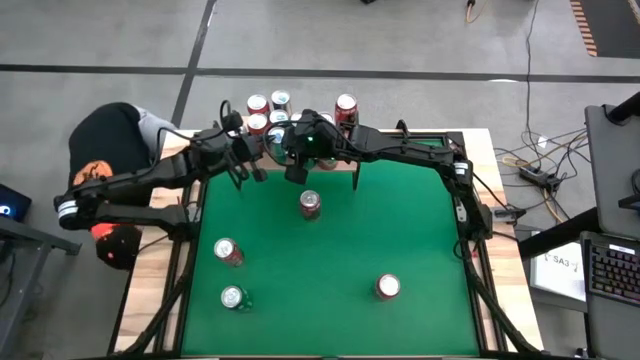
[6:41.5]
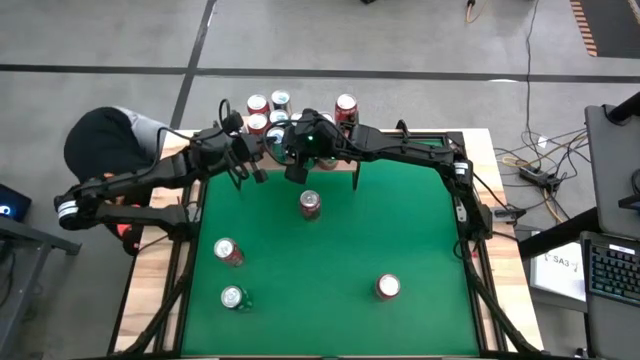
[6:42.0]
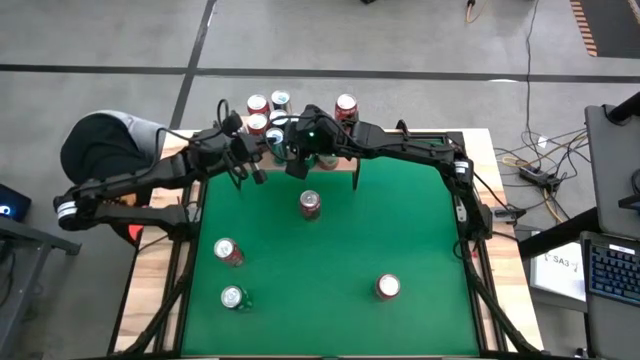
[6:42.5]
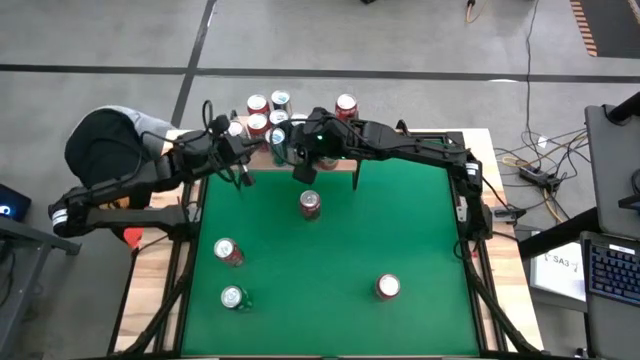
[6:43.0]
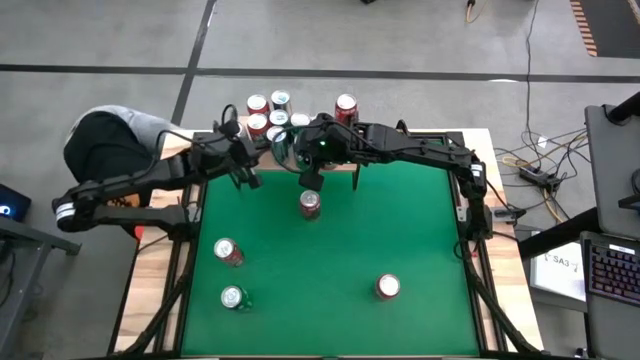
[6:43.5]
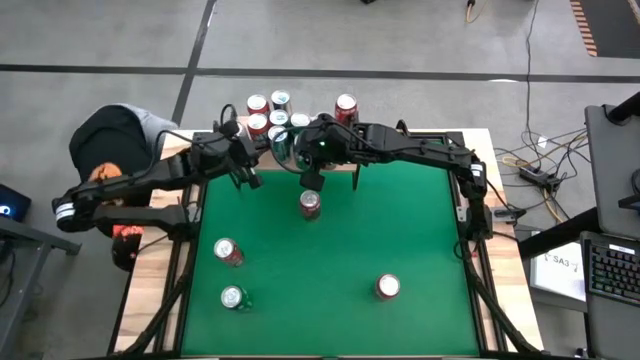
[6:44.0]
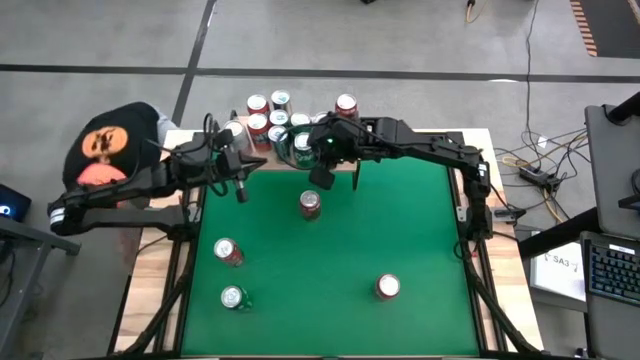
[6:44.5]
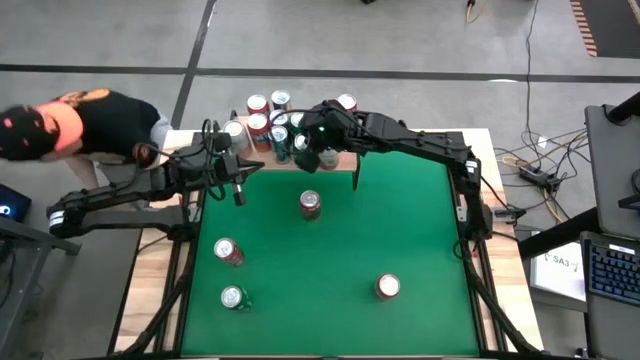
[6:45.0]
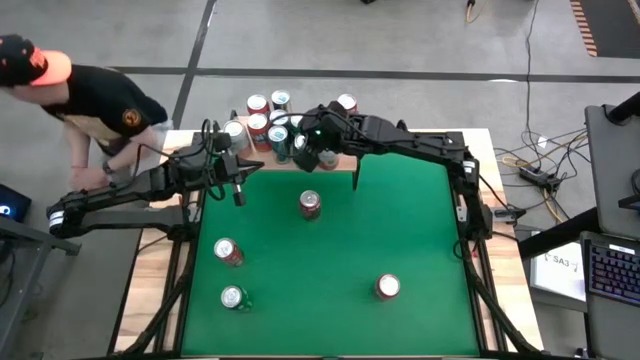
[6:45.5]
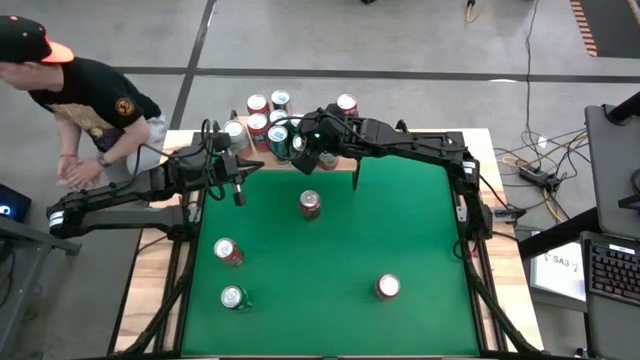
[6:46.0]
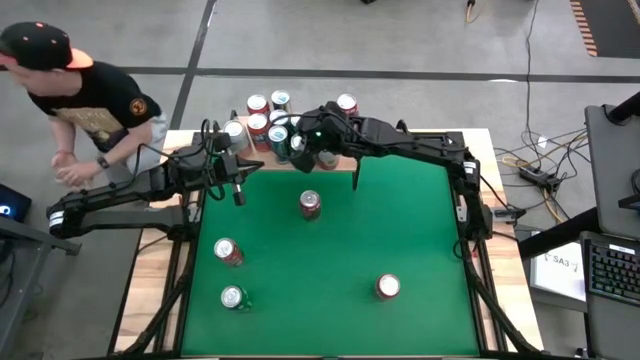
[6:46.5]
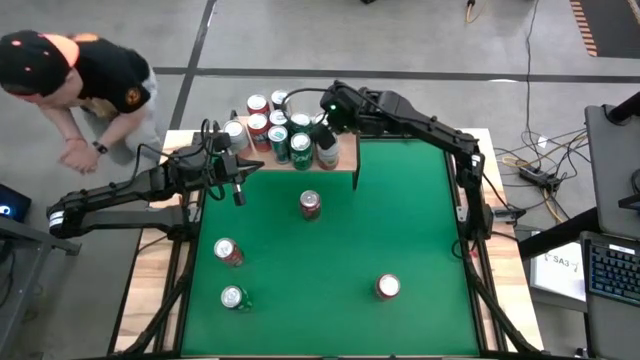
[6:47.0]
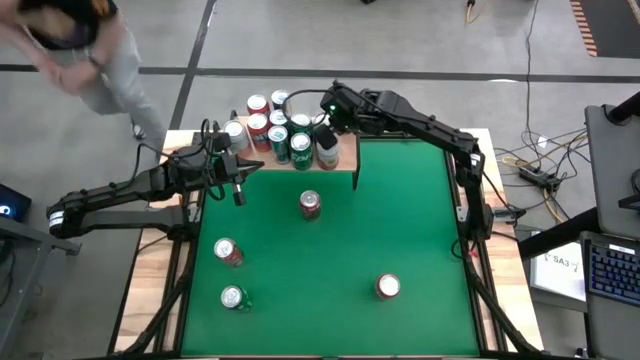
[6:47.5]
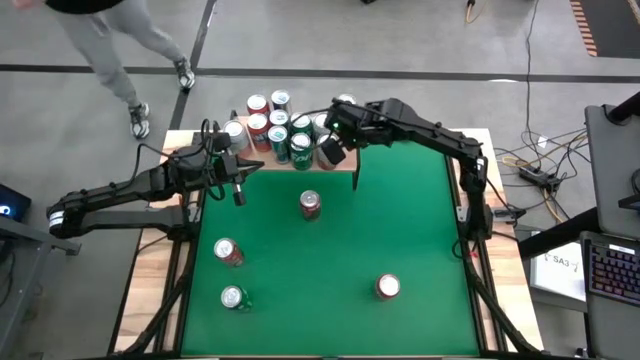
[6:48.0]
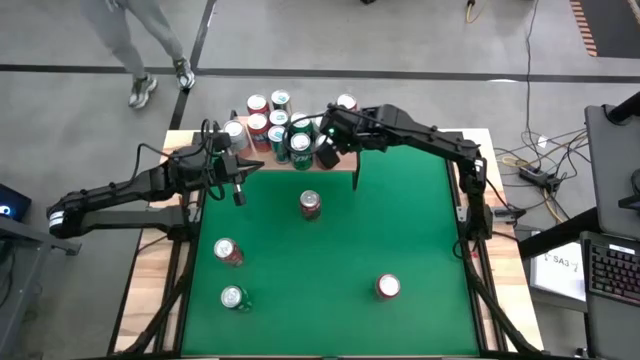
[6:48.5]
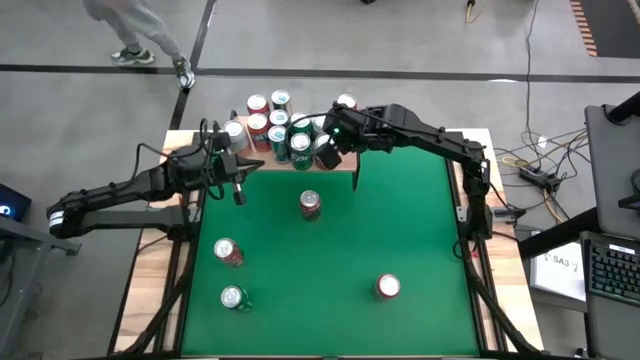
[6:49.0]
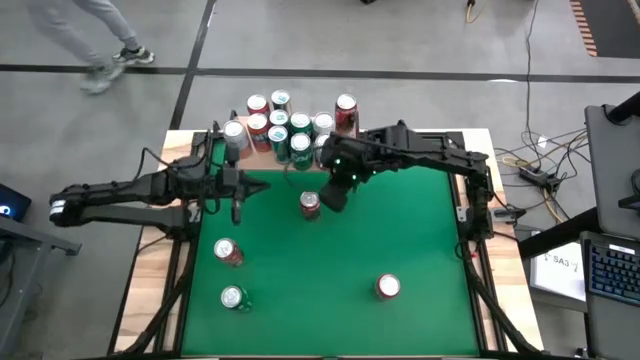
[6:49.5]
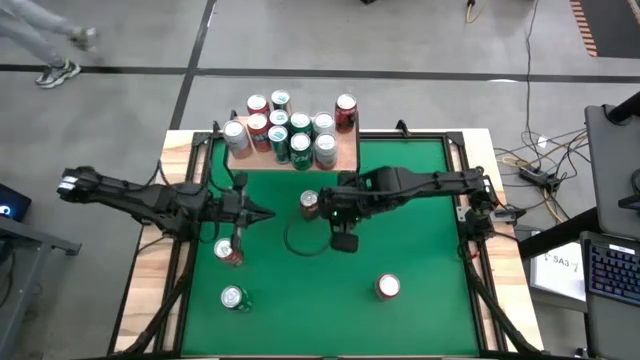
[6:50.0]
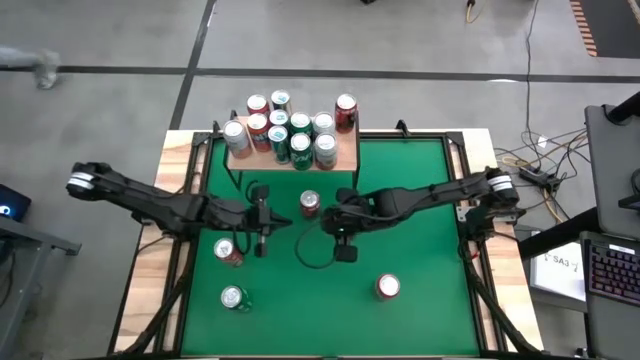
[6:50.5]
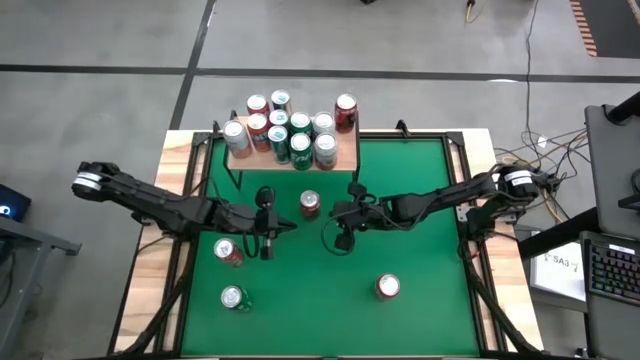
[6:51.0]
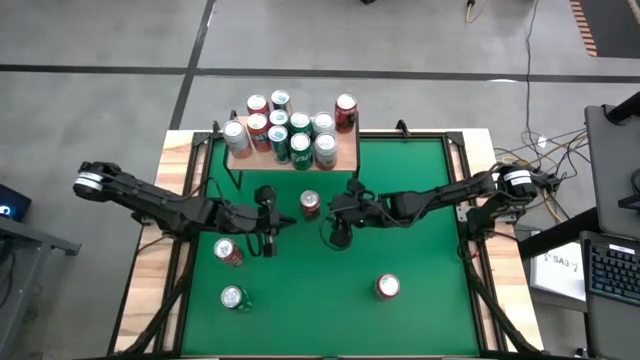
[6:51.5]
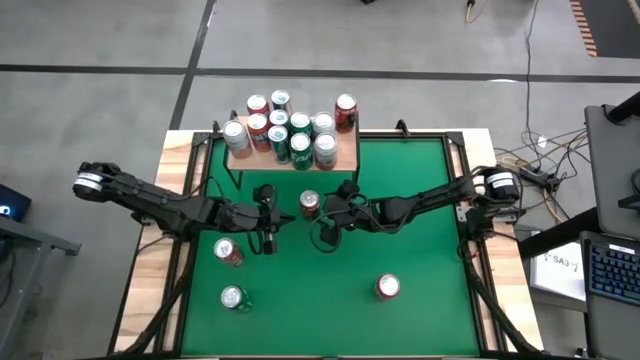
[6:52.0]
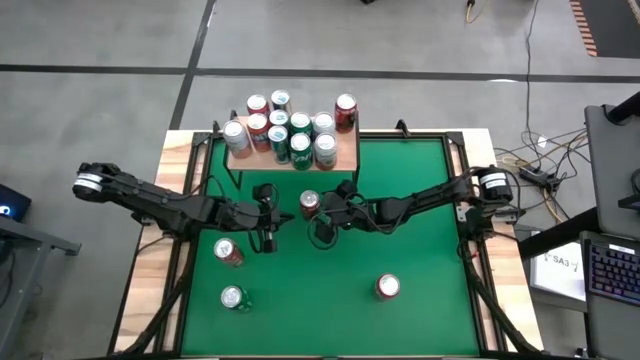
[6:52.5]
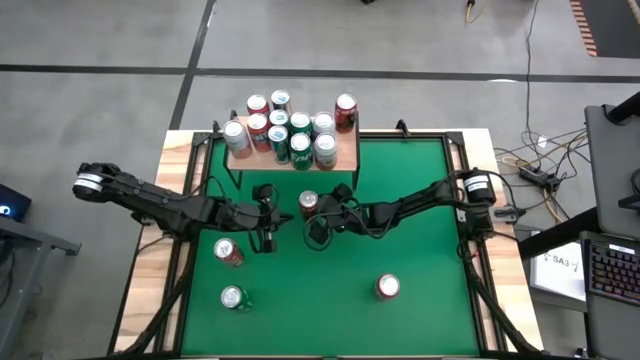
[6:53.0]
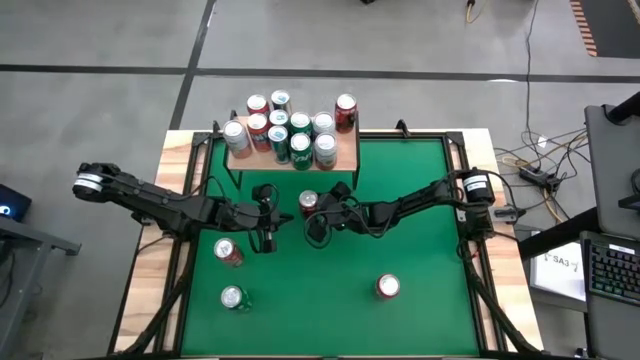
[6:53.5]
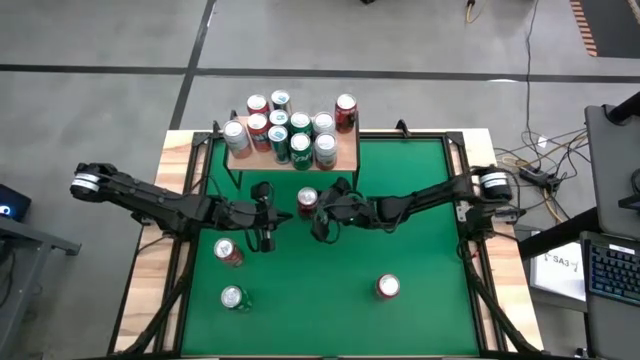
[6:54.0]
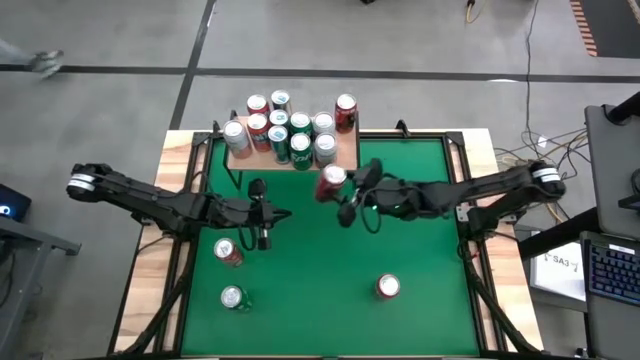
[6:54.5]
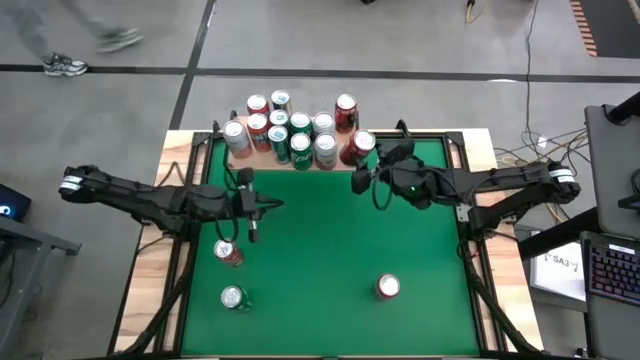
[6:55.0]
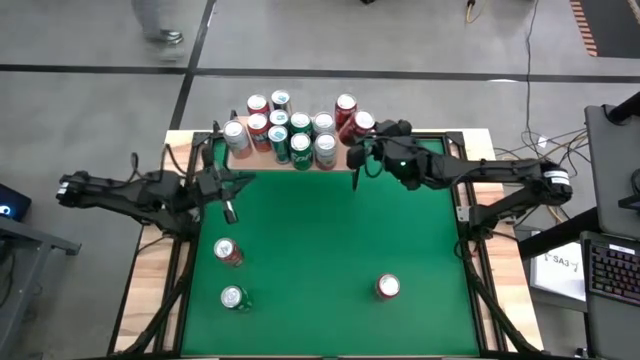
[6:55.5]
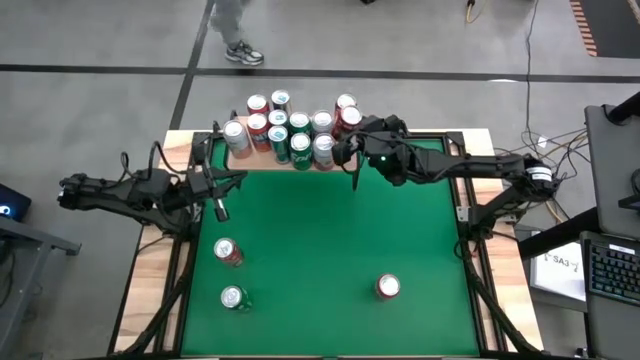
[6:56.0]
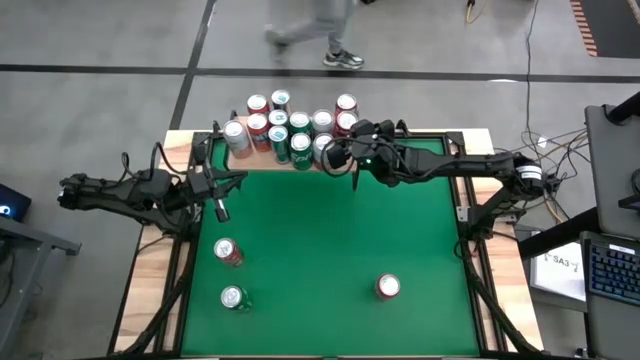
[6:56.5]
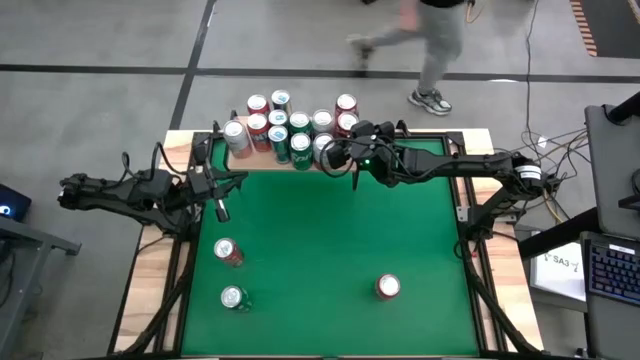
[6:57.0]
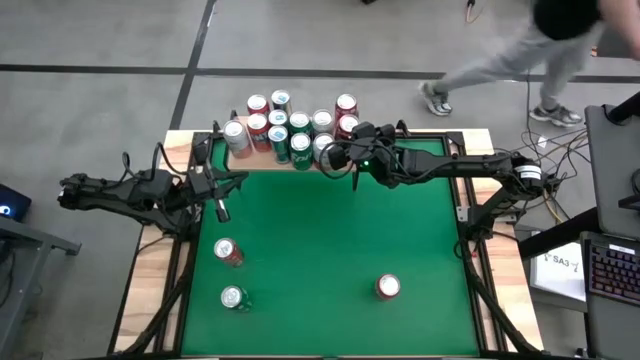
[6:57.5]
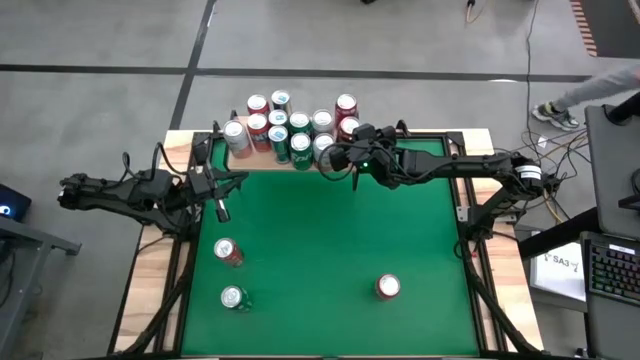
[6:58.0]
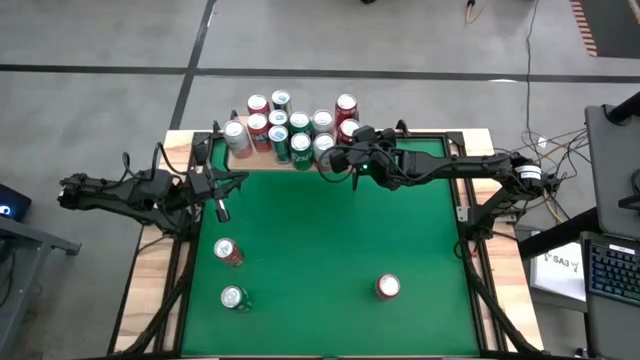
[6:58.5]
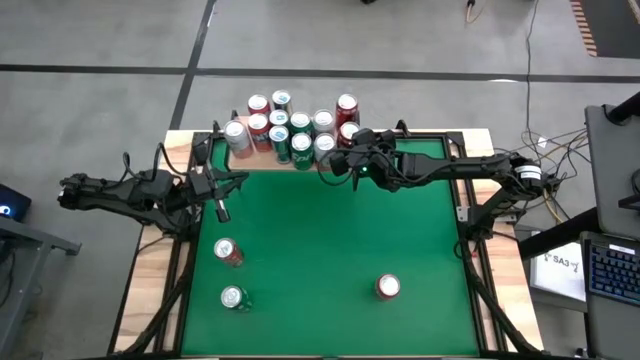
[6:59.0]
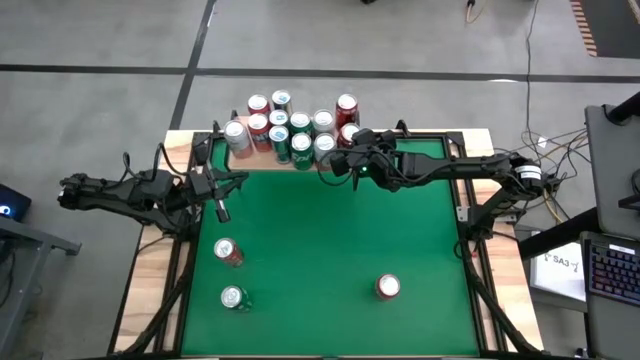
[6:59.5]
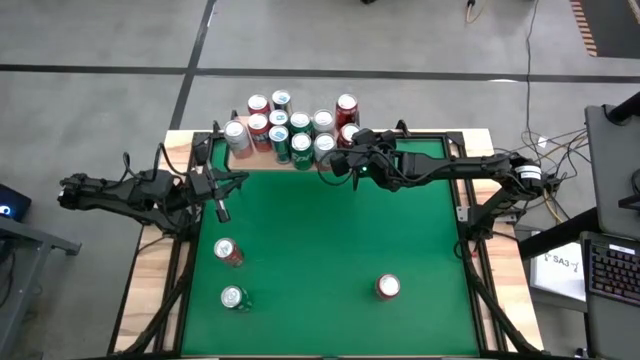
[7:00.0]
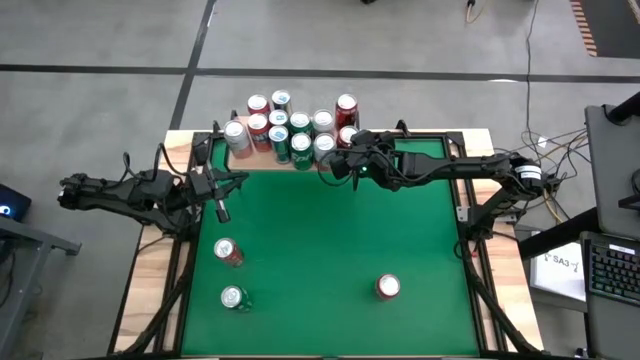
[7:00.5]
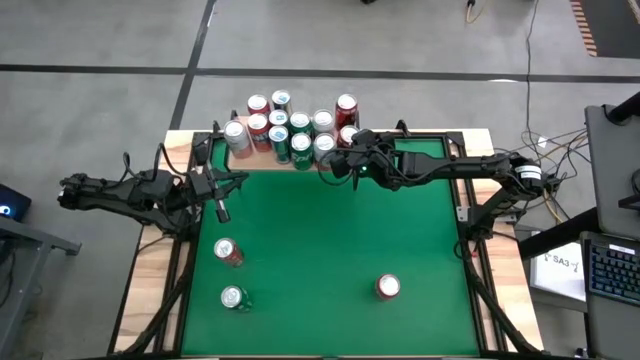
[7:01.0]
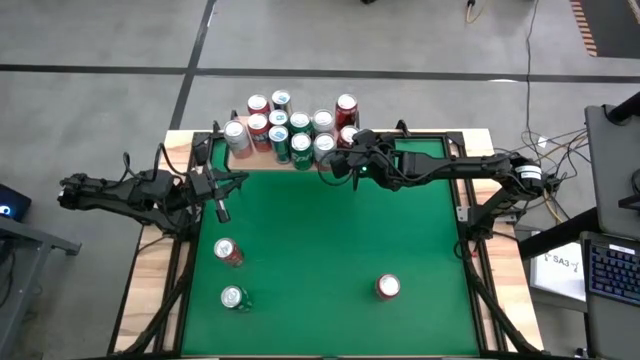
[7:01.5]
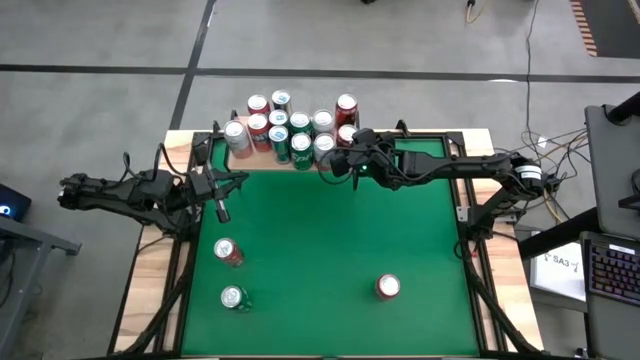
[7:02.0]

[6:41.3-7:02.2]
Task: Place canned beverage on shelf
Put the red can on the shelf
